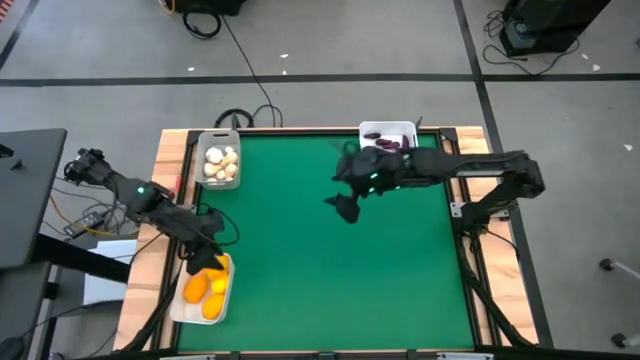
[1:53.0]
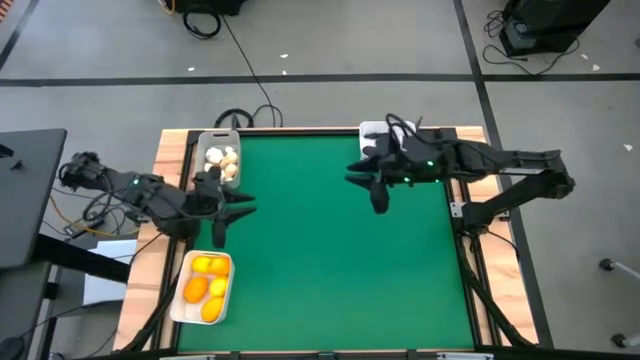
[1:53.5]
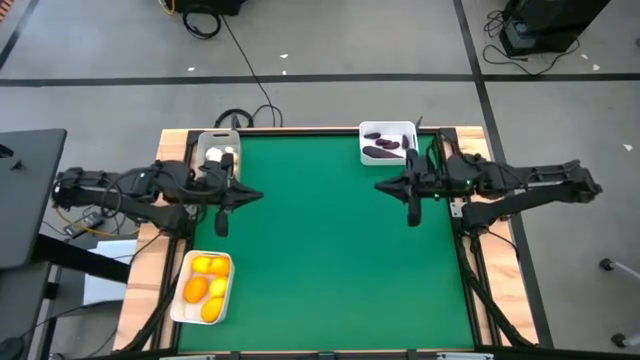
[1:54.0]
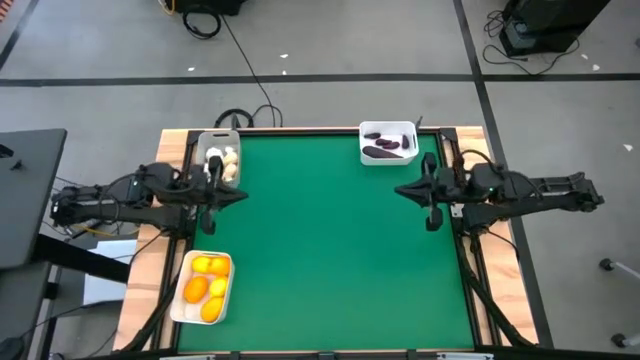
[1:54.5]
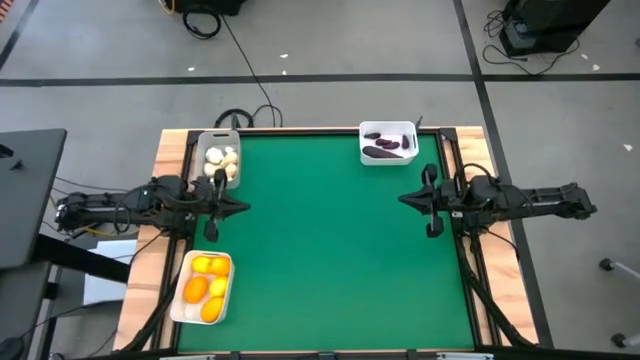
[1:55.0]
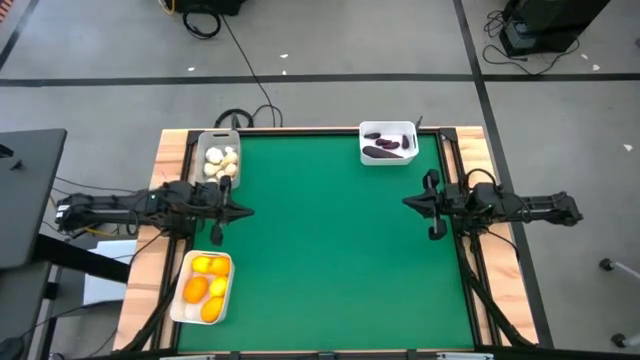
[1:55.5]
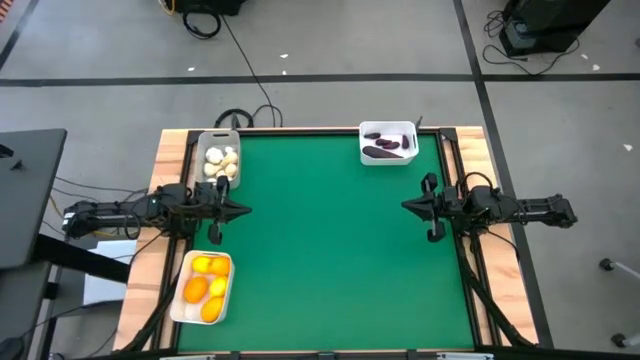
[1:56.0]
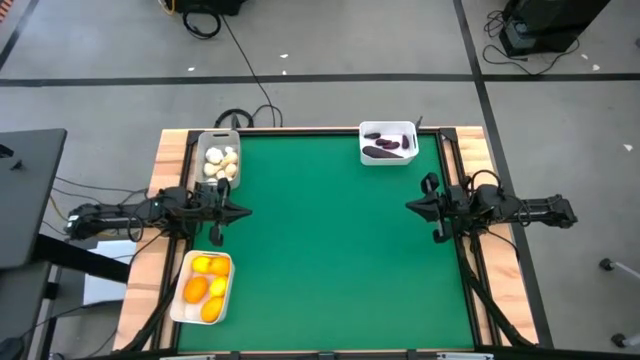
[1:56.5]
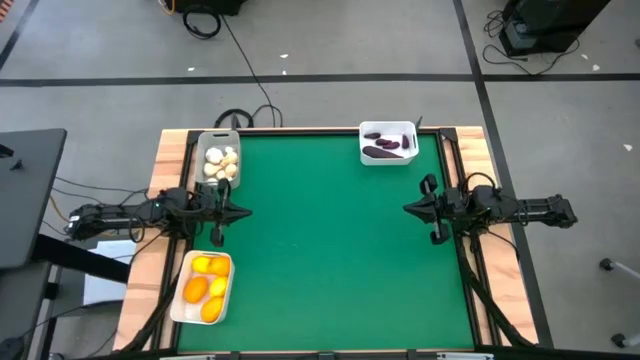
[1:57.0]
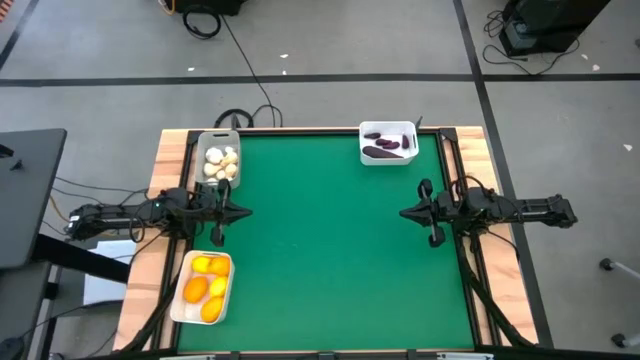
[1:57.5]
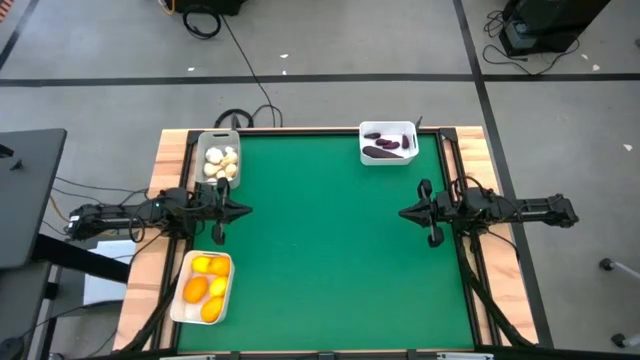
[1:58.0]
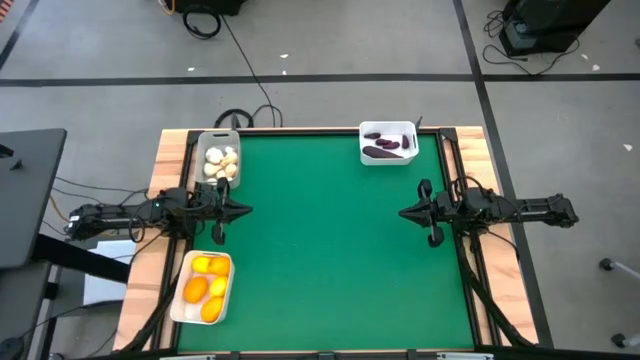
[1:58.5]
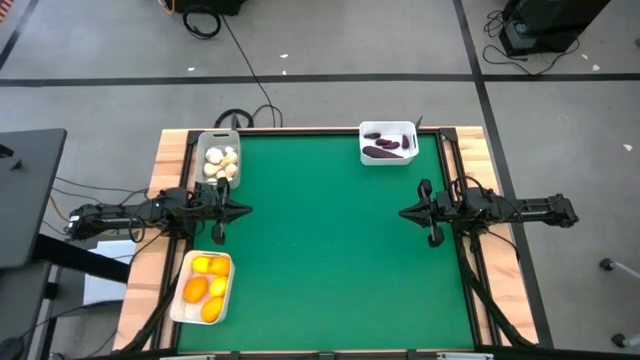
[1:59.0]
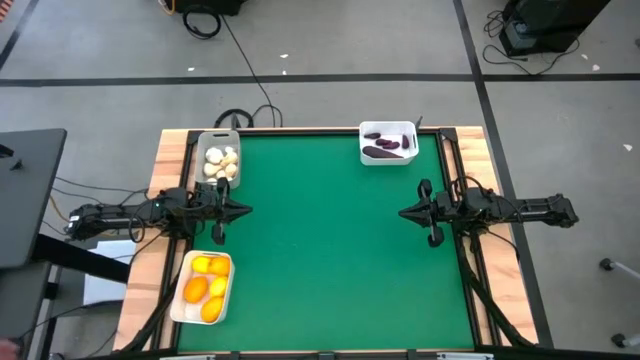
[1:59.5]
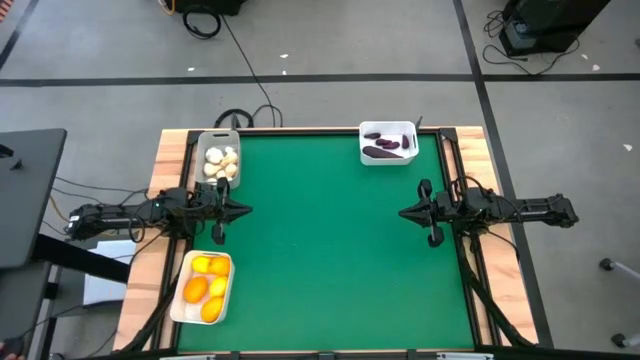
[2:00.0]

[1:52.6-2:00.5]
Task: Sort produce into baskets
Return to Home Position

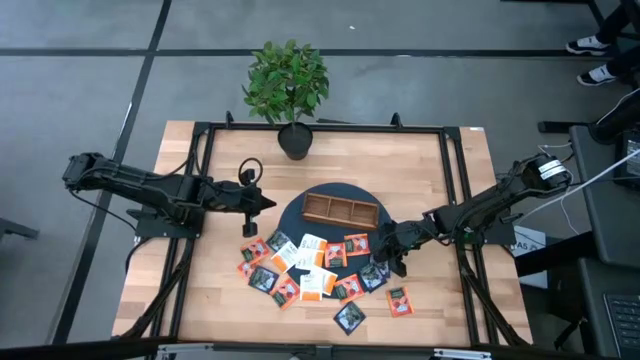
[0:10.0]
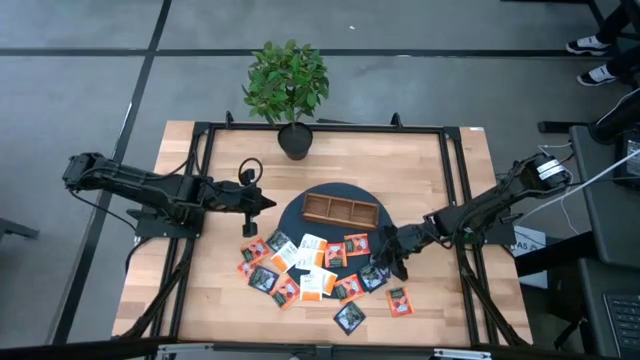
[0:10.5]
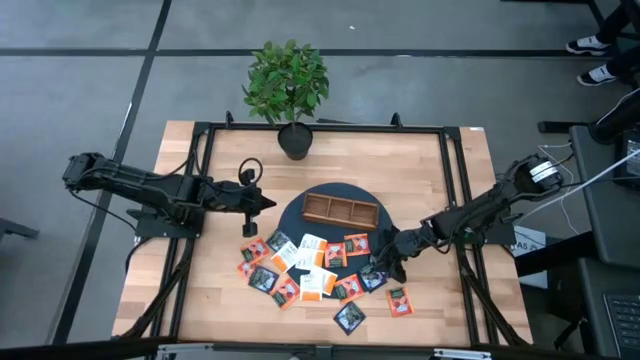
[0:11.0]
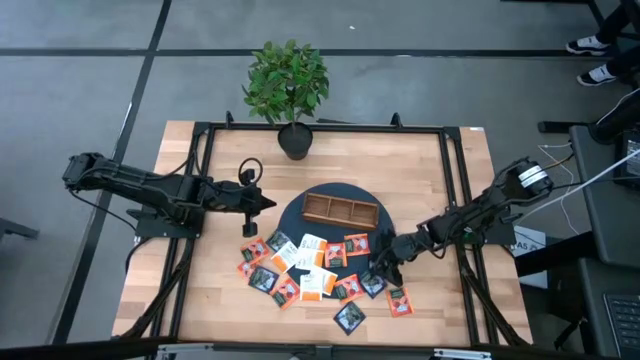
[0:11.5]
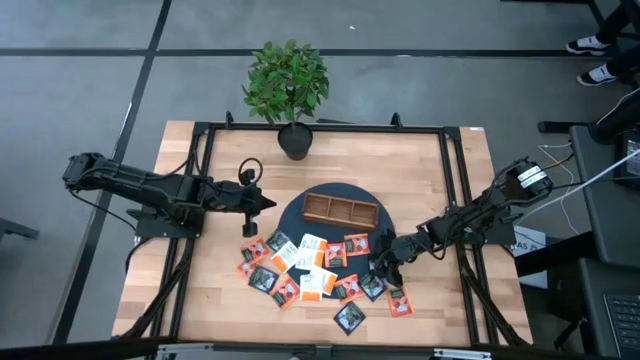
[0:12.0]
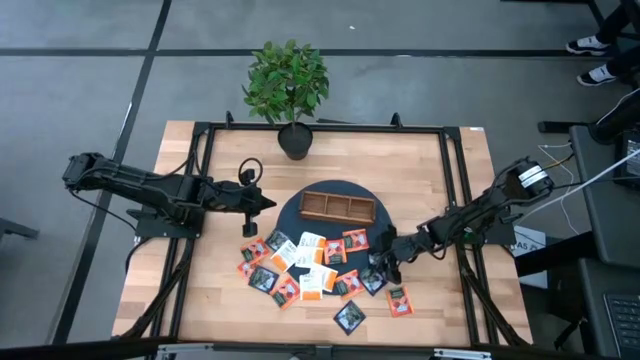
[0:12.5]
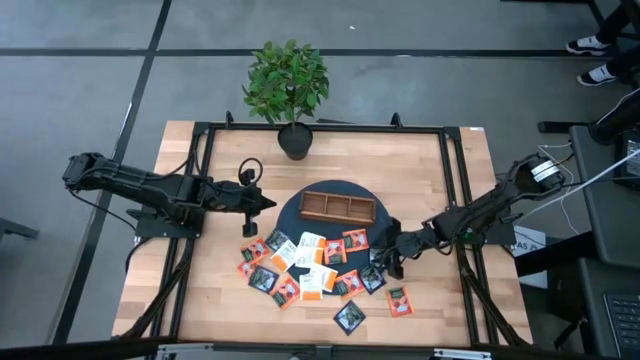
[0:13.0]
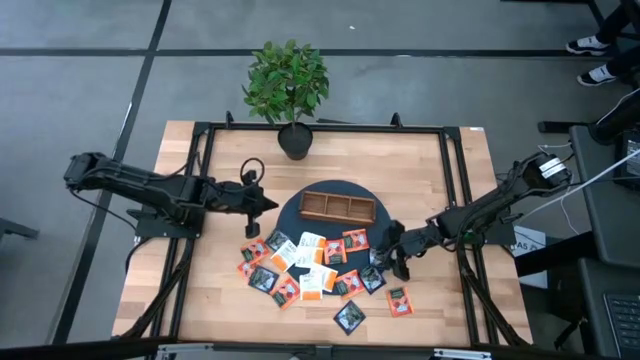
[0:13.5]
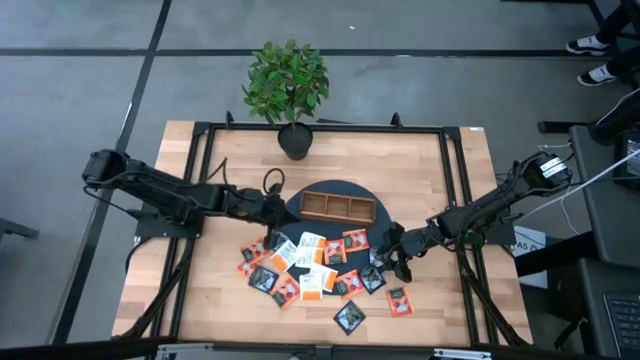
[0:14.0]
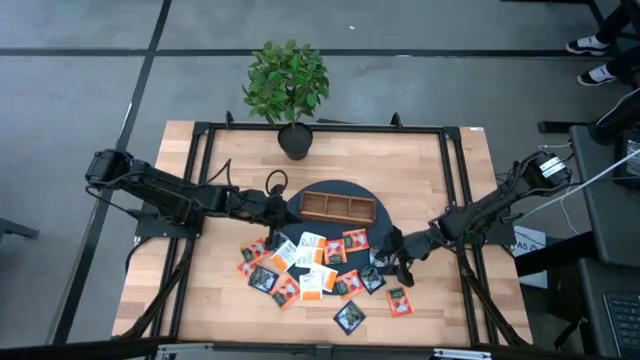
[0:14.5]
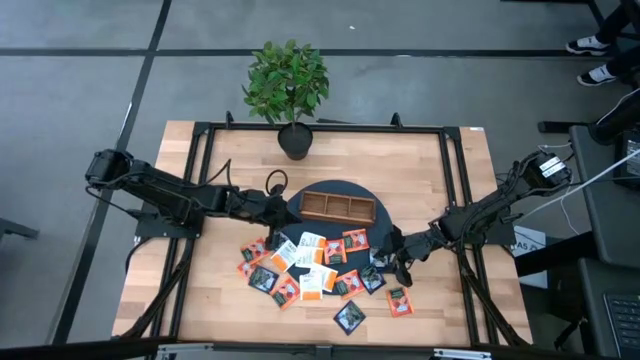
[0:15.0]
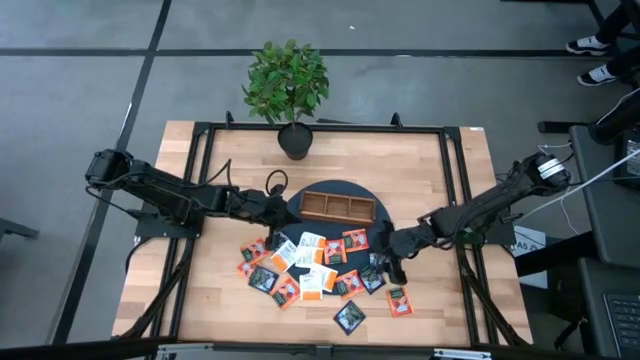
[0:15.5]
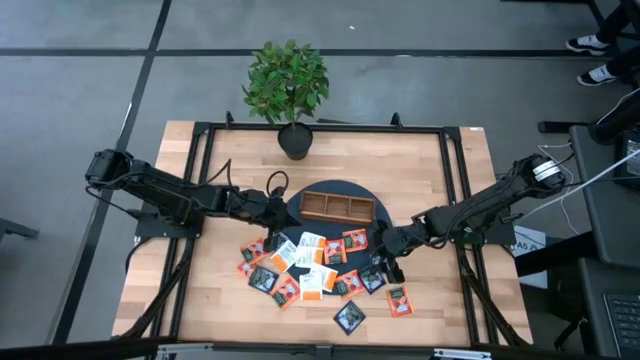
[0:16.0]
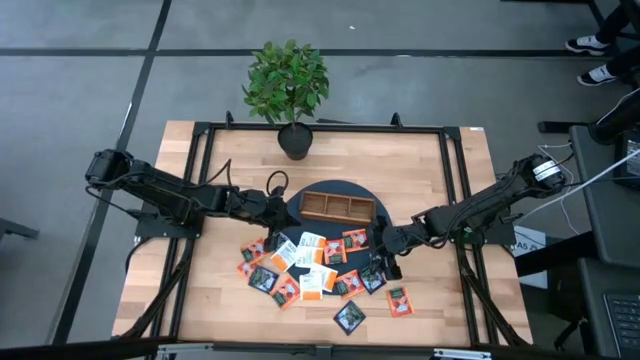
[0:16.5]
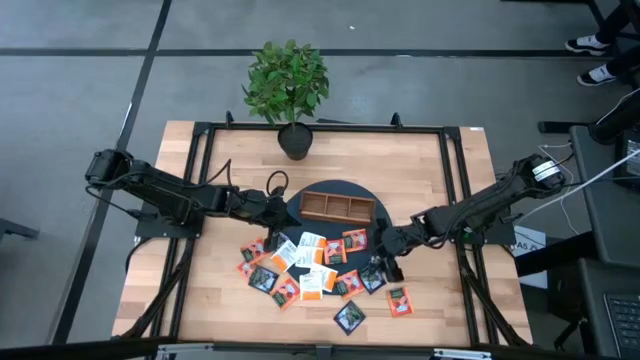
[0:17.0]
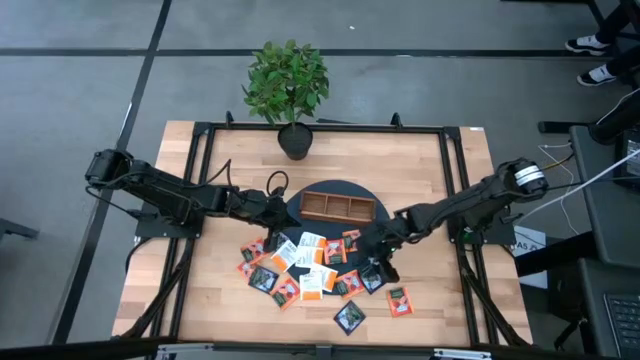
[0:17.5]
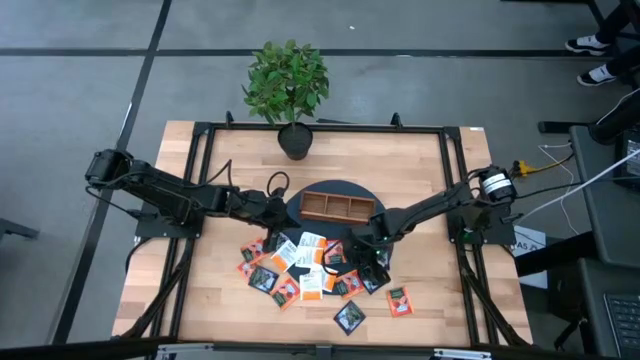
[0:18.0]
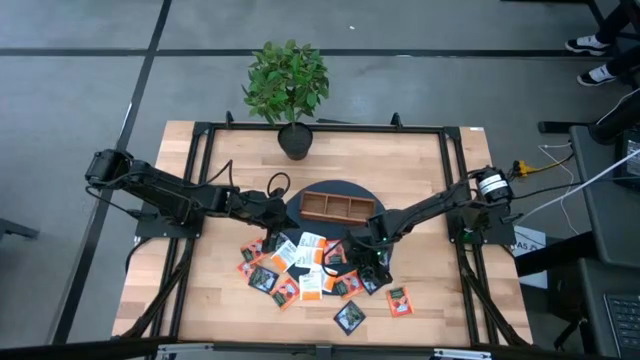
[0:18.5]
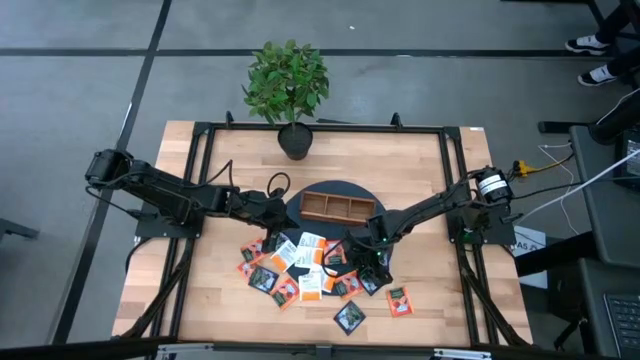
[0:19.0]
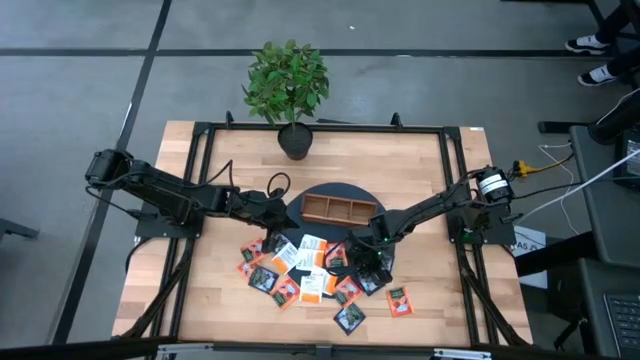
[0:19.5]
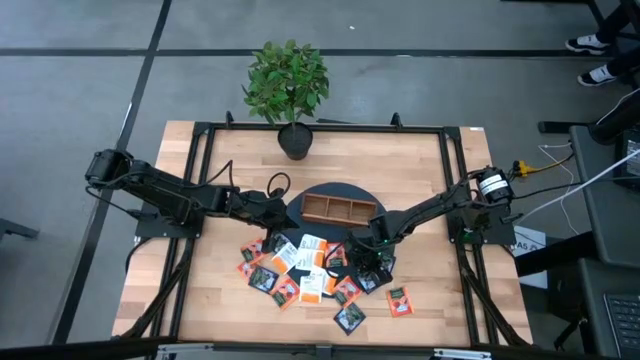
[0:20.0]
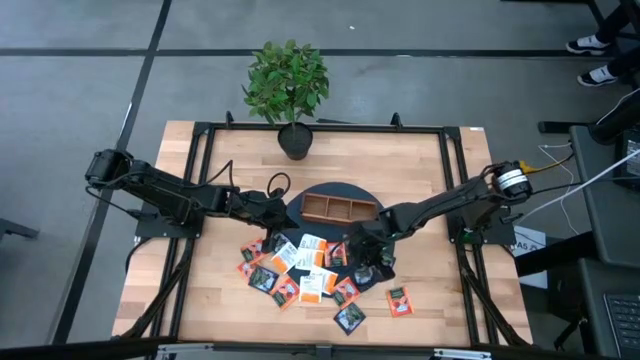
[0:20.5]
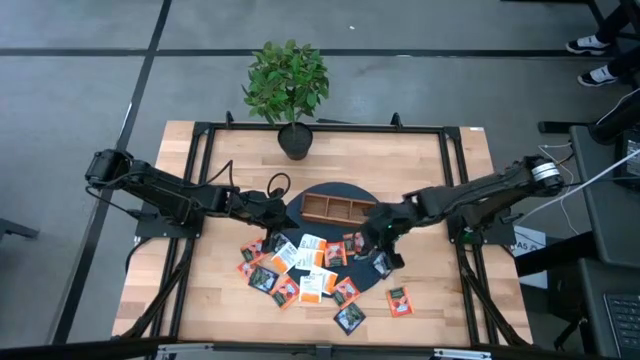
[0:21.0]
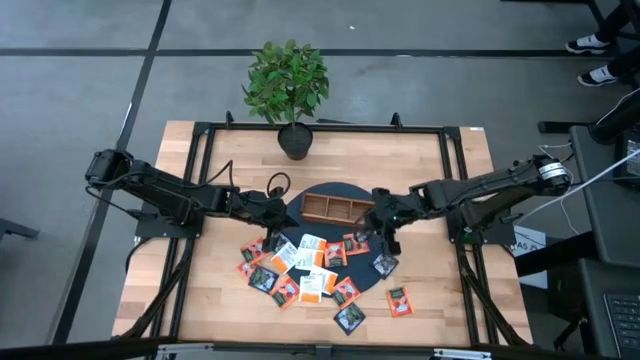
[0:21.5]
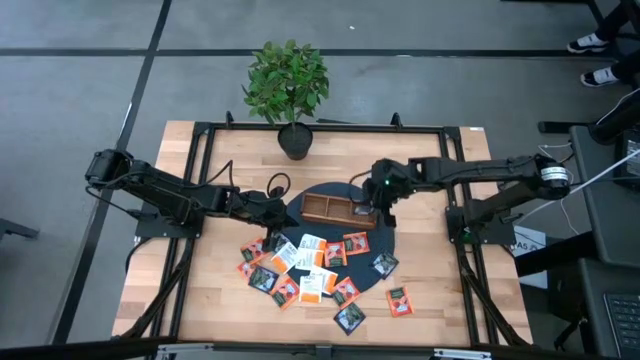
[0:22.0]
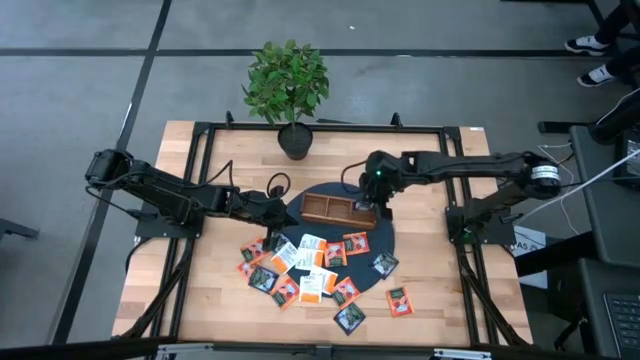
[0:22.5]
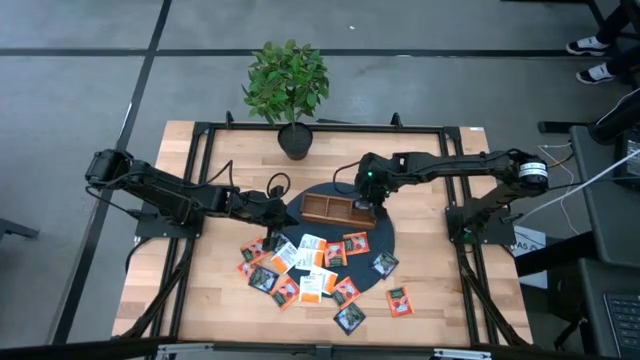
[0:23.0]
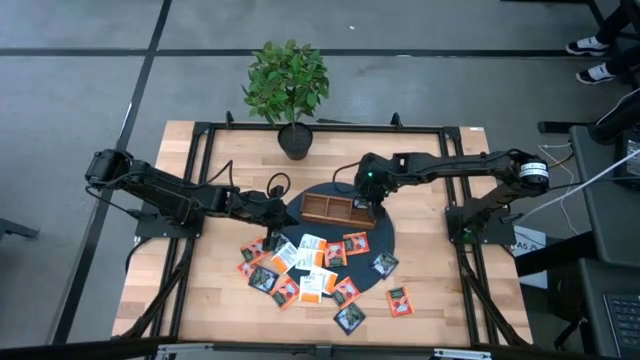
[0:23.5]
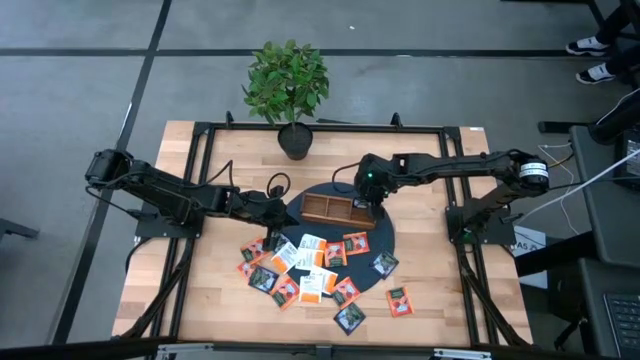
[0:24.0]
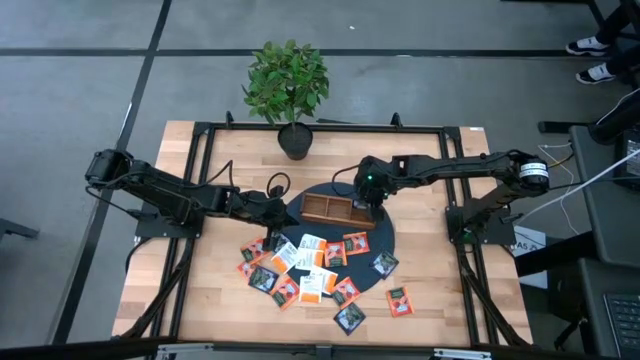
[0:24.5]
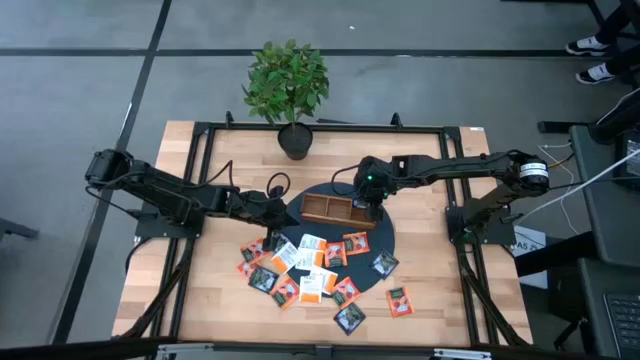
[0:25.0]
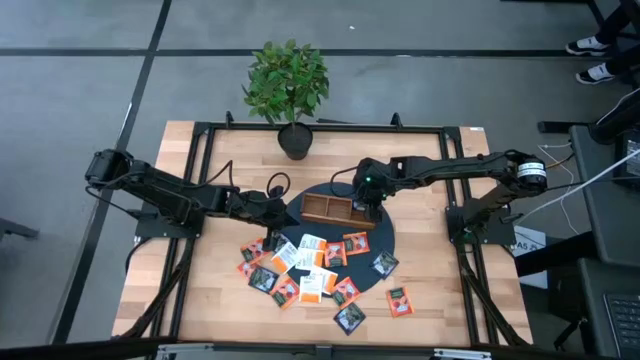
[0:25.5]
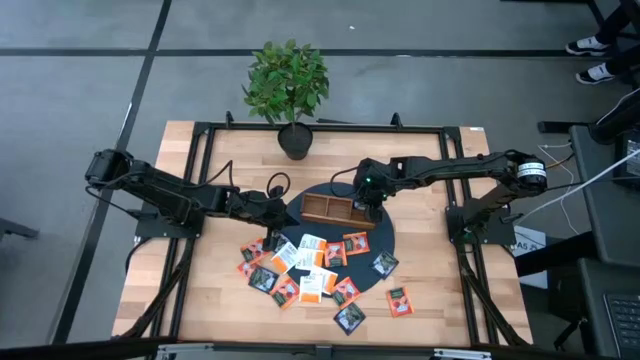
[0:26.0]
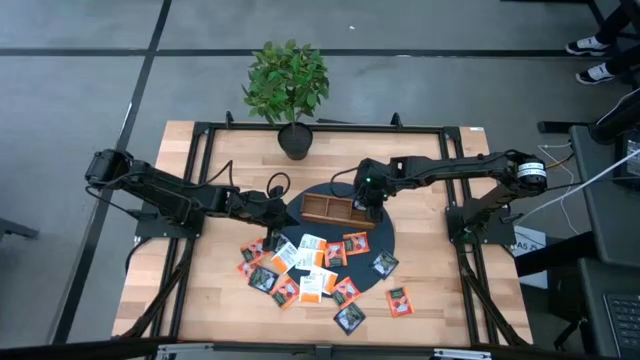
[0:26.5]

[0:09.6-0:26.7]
Task: Pick & Place Tea
Put the violet tea bag into the right side of the wooden organizer
